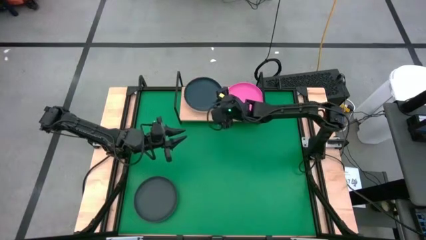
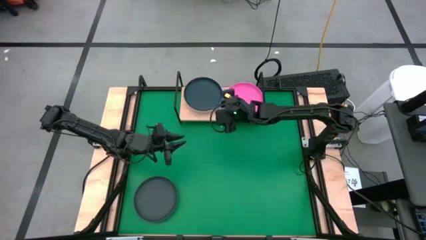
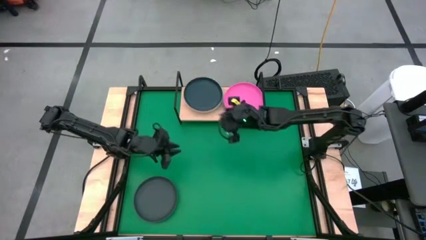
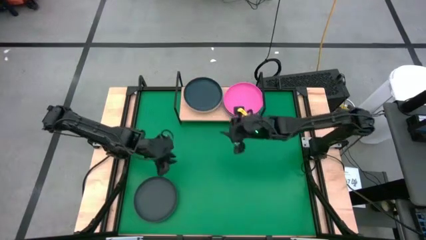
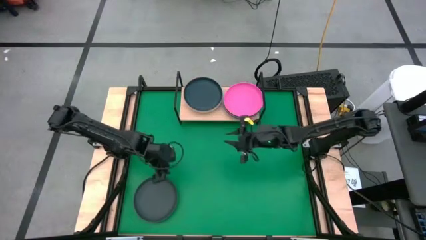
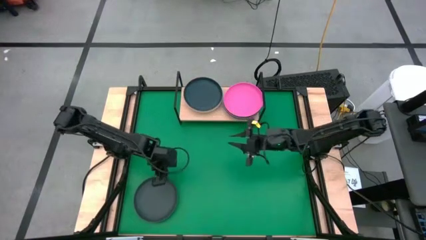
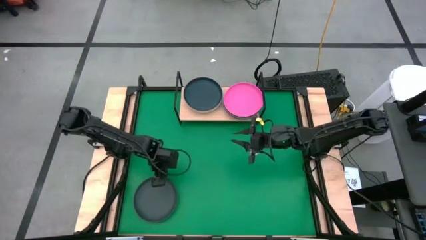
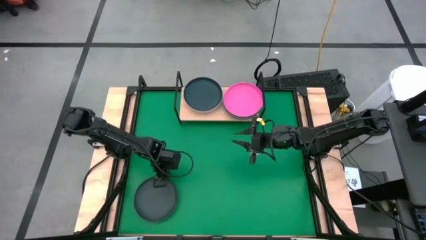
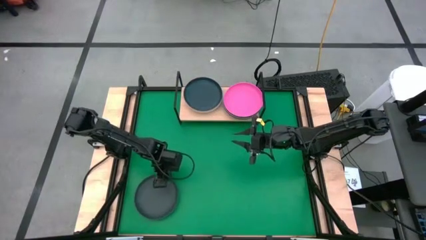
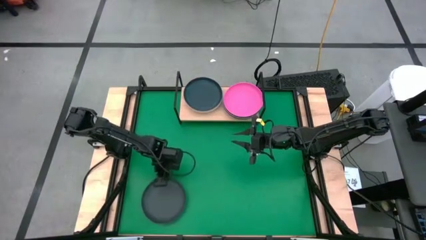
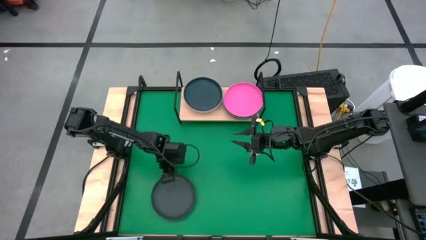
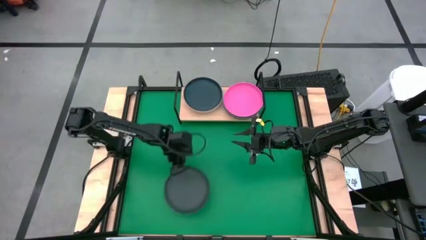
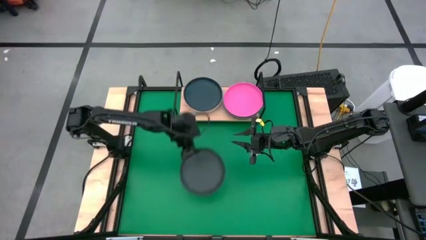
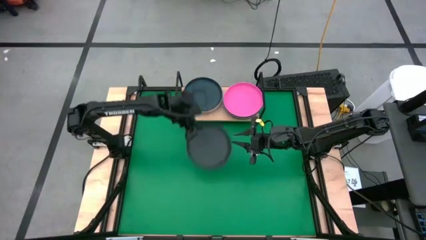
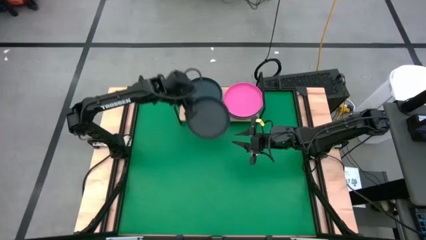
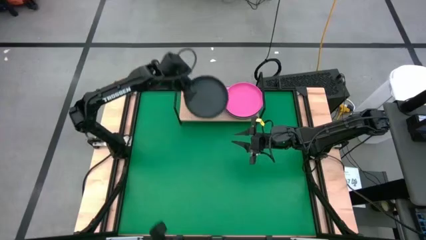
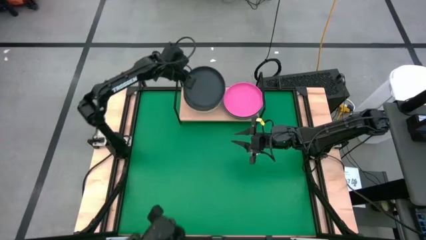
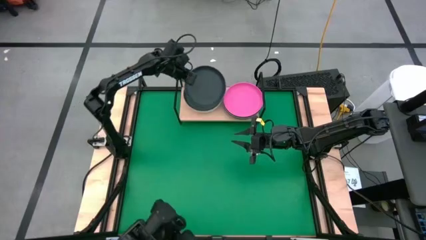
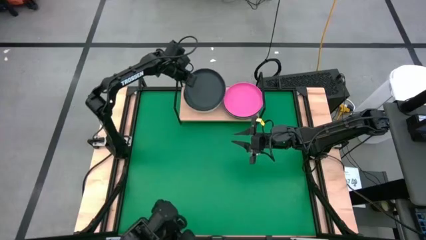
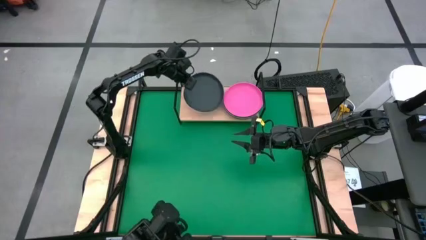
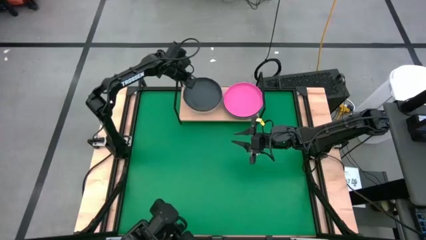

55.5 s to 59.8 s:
Task: Place and stack plates onto a shelf
Stack the black plate on top of the dark blue plate on the shelf

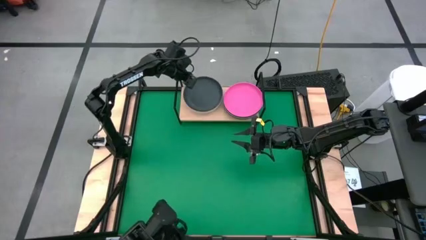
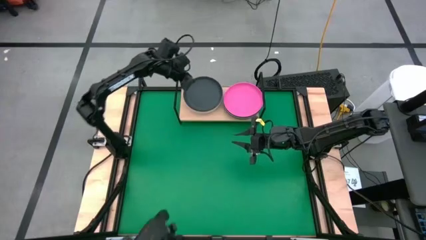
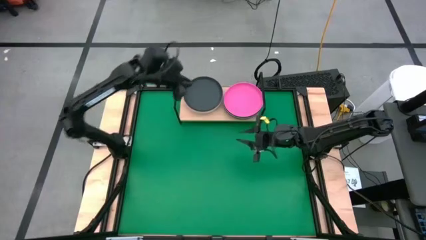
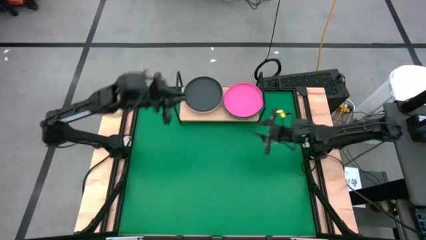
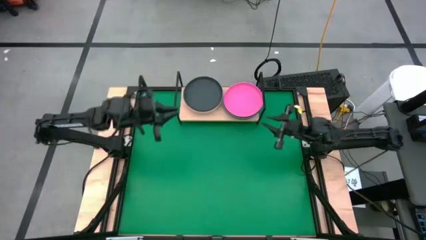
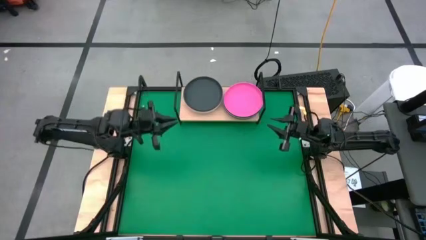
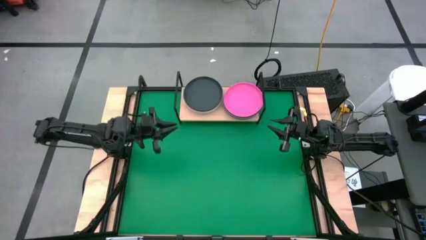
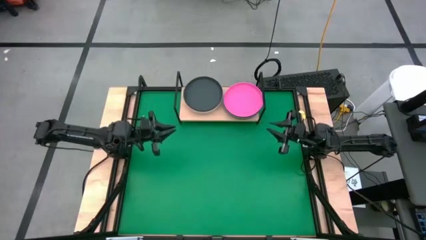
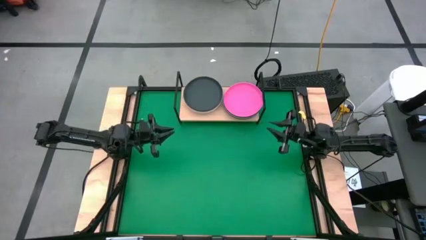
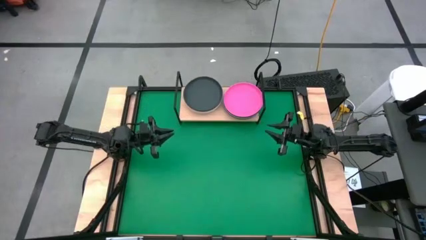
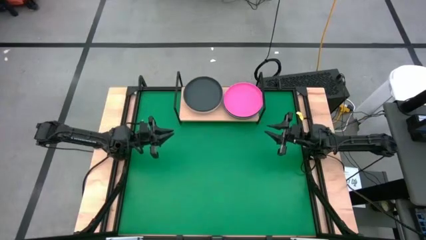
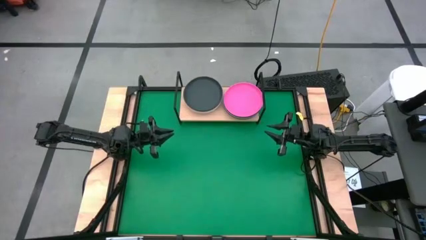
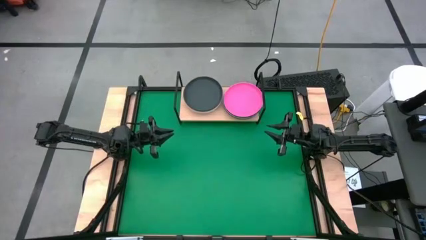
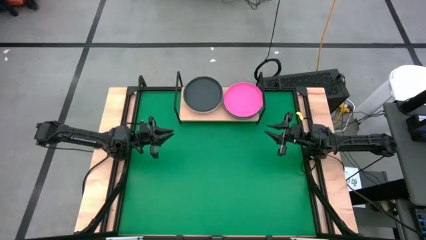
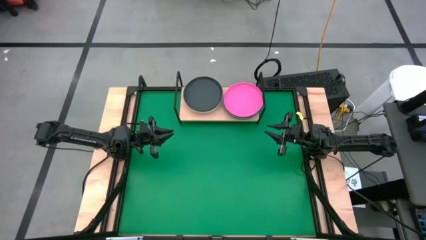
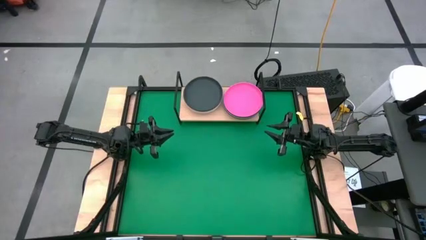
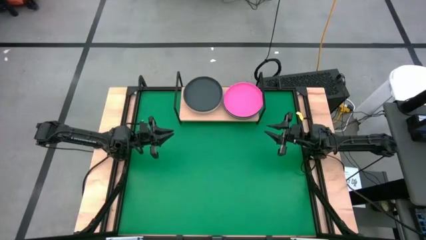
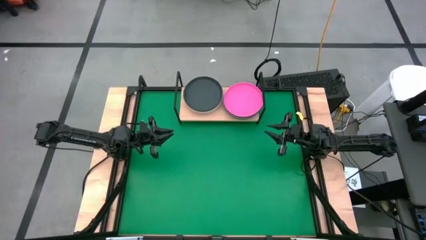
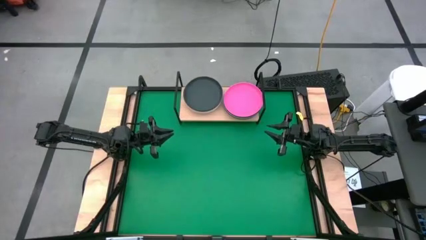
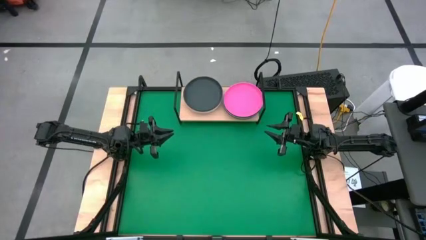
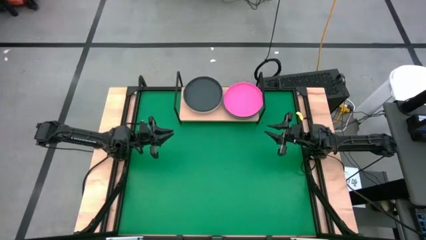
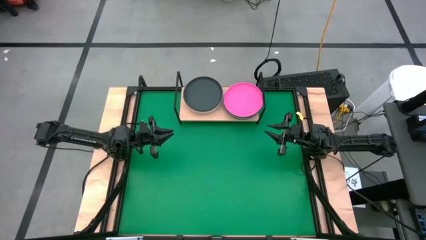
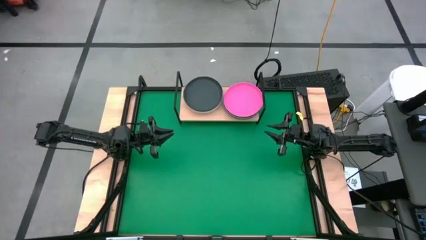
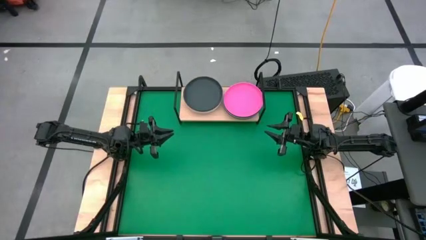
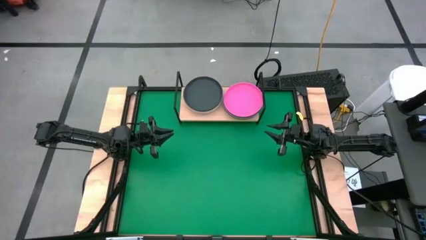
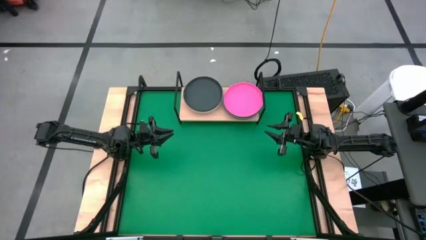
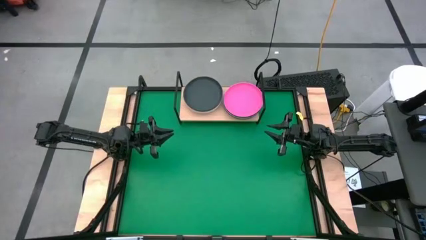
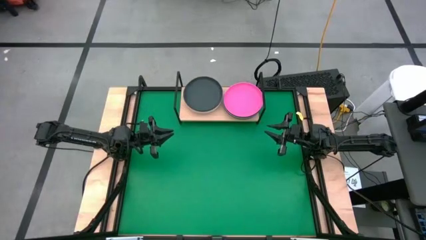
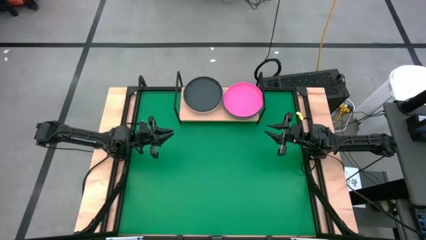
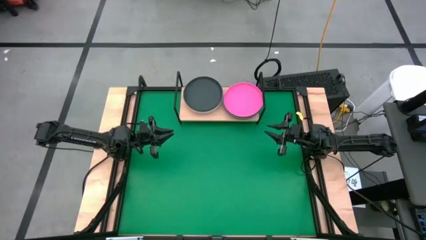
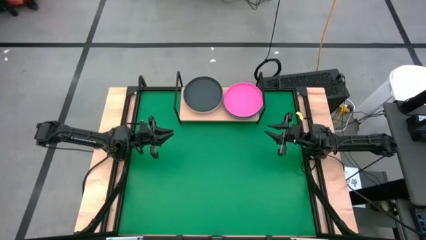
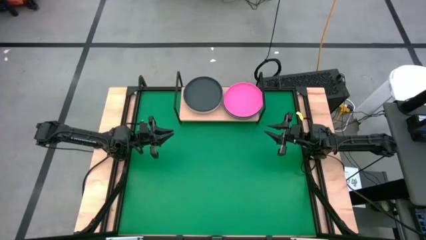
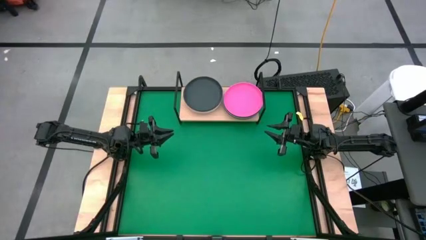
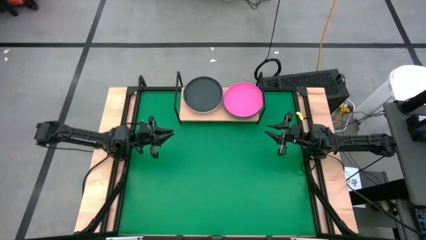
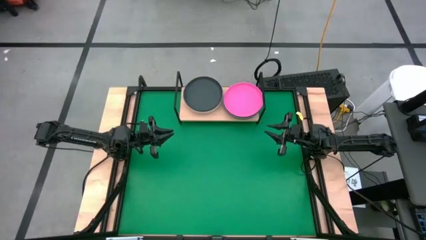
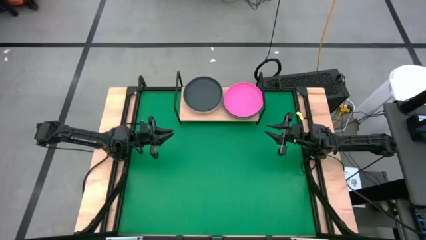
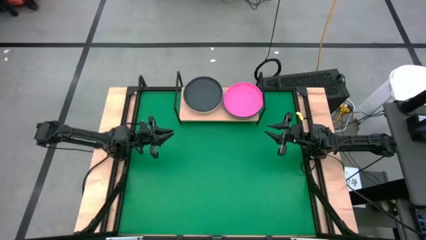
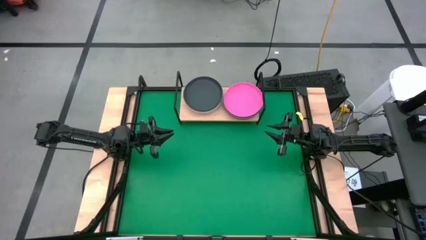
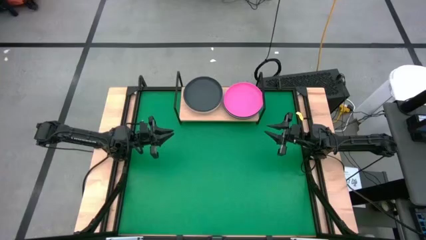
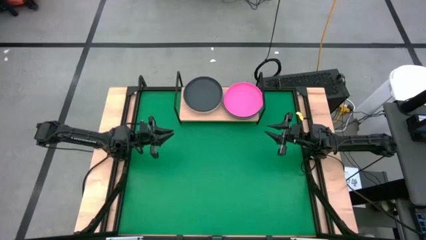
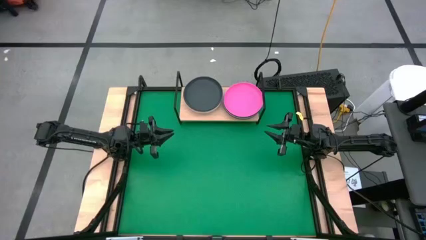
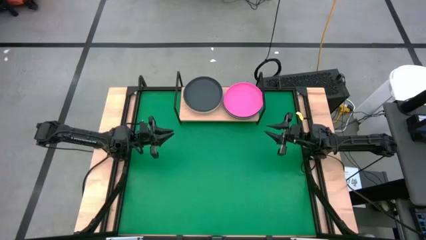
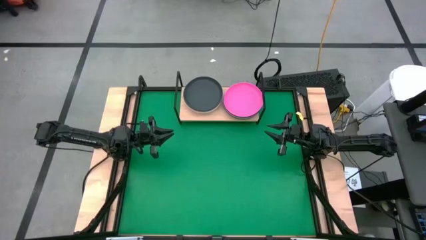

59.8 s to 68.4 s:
Return to Home Position

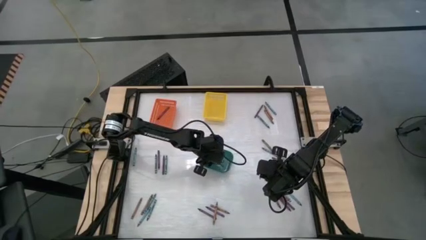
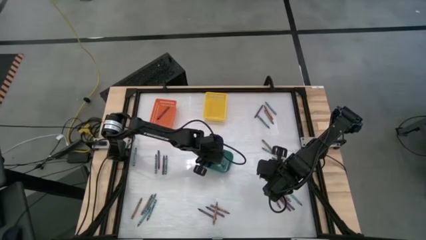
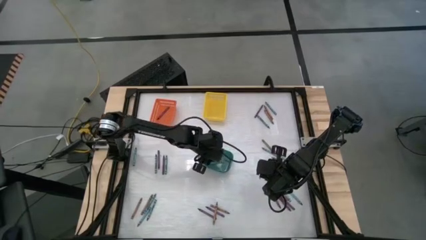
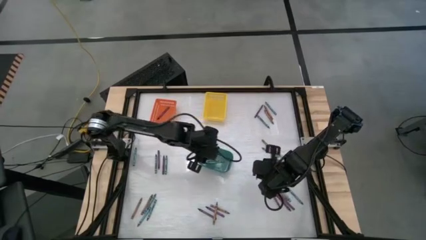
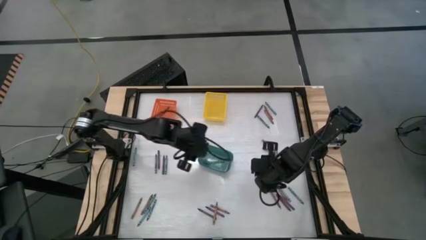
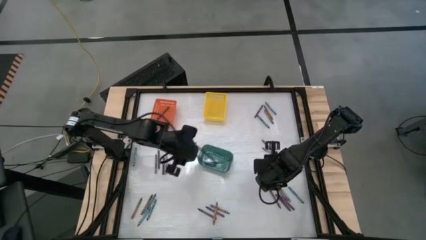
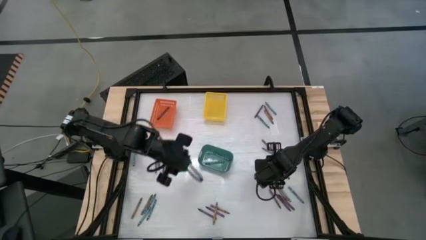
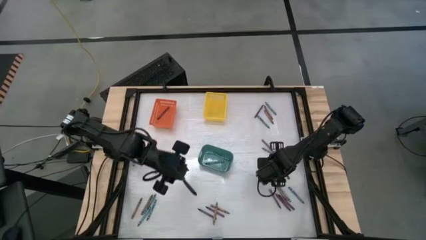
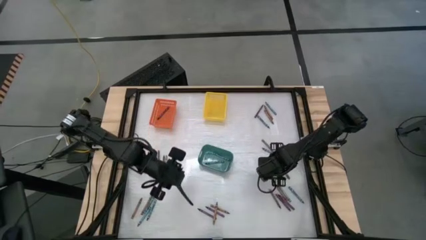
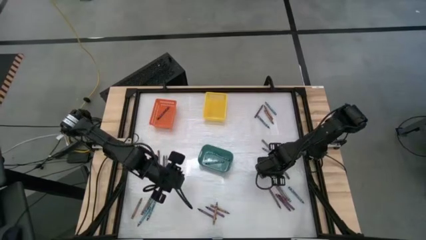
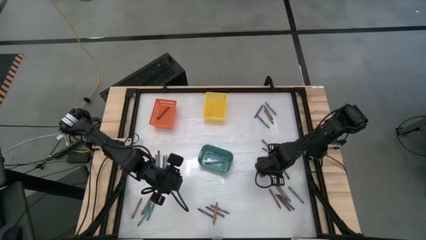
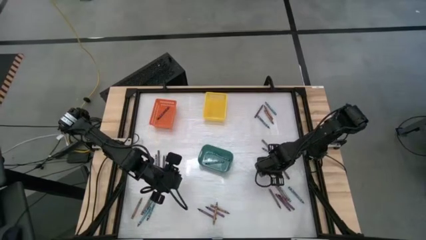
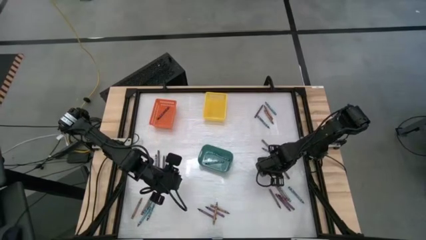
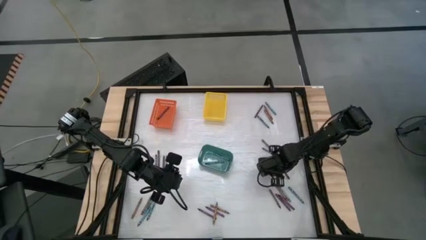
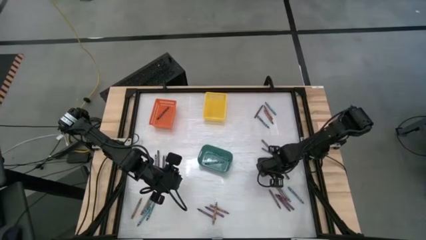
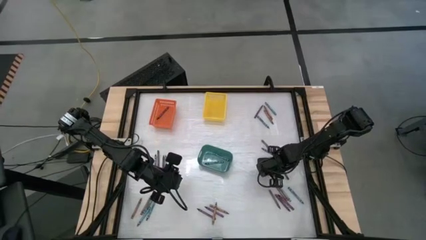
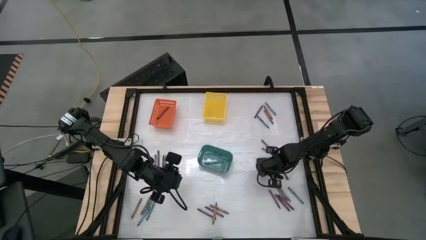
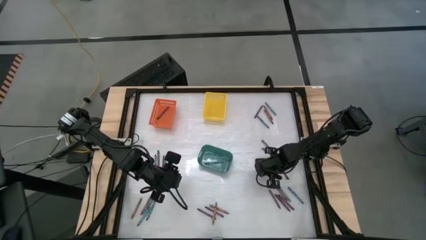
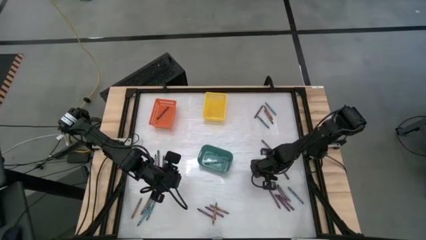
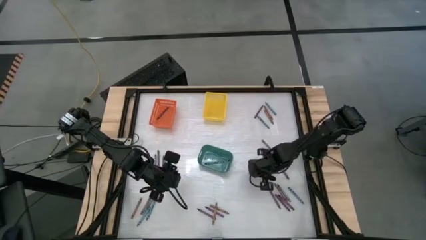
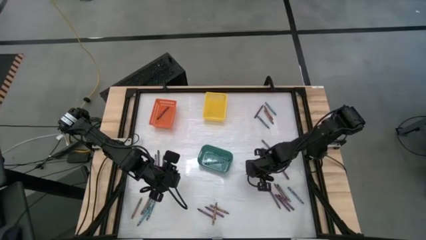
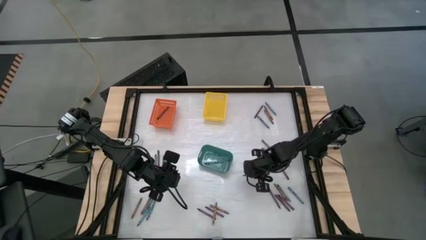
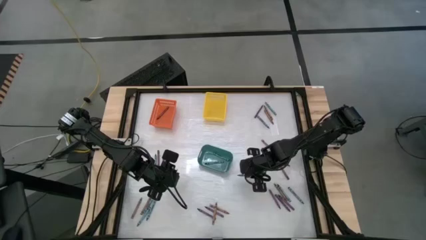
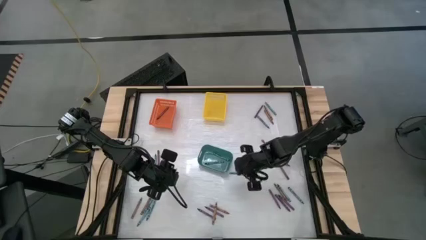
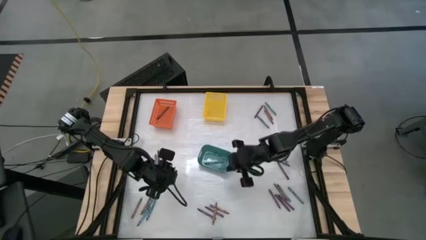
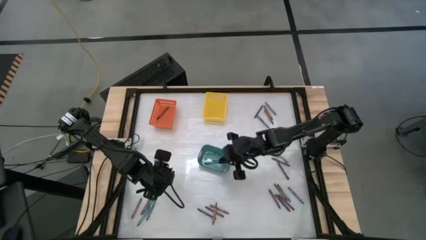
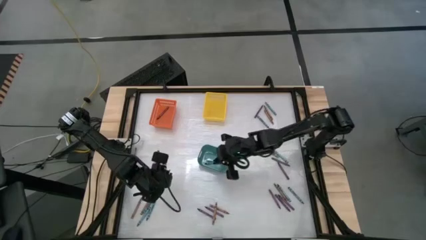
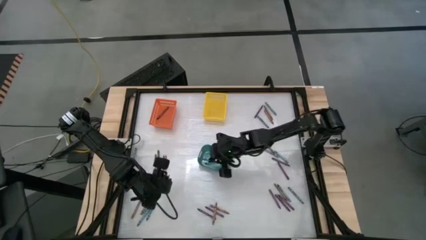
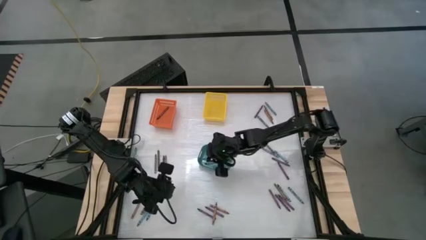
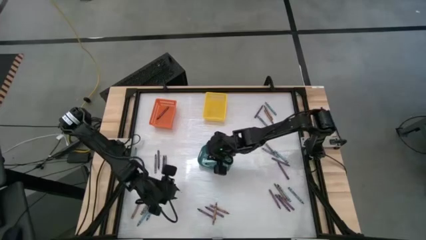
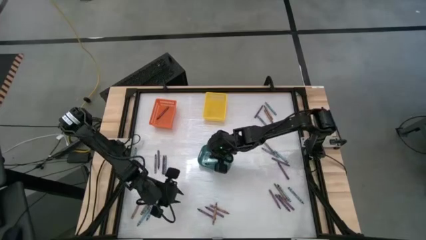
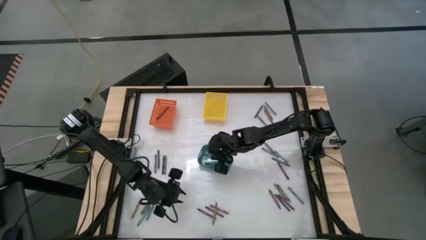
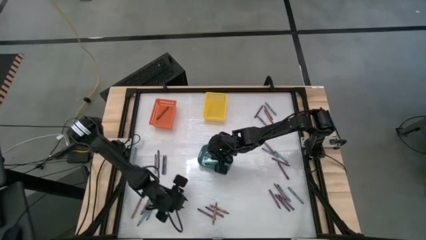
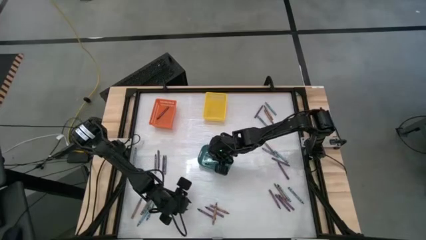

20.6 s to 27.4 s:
Task: Sort crayons
Put the blue crayon into the blue bin
